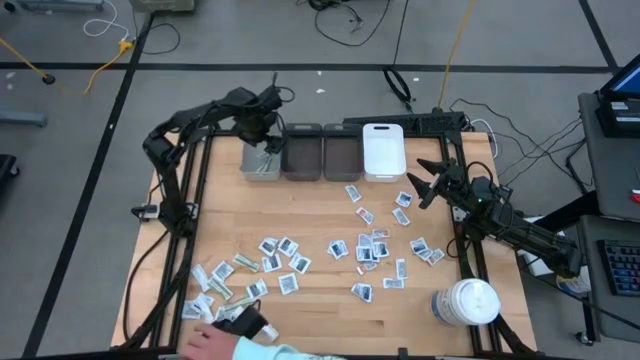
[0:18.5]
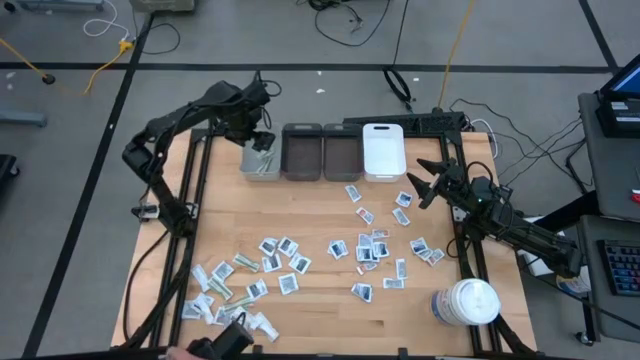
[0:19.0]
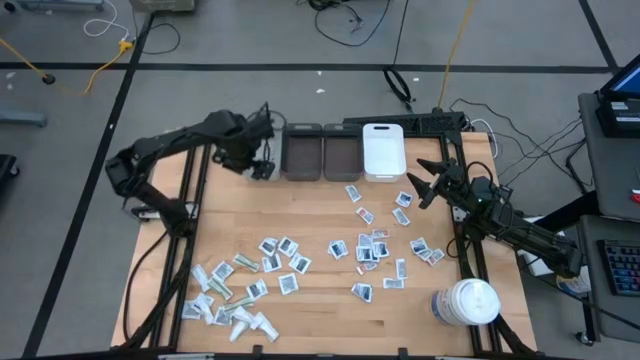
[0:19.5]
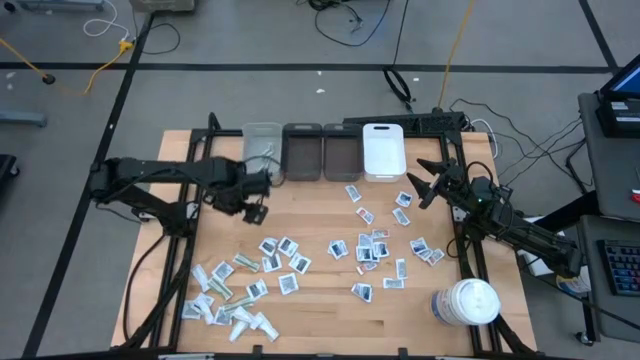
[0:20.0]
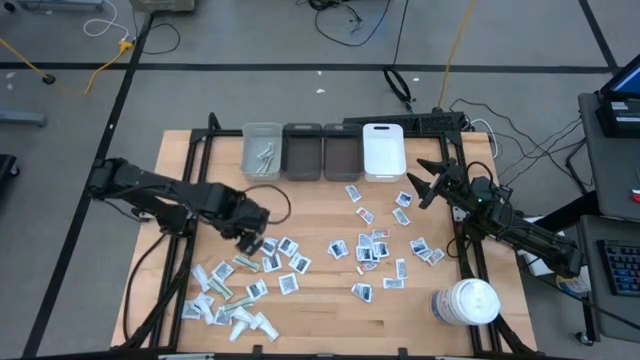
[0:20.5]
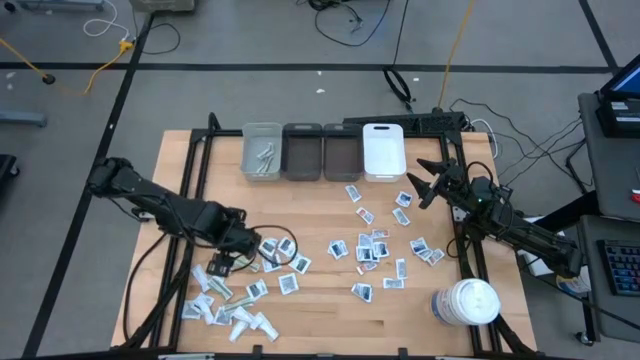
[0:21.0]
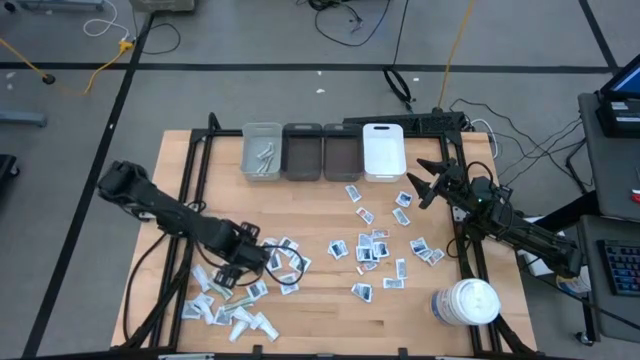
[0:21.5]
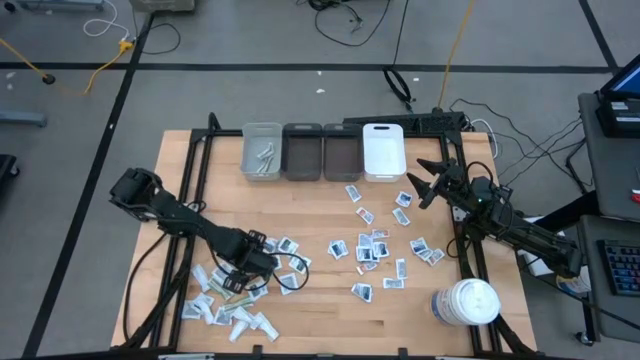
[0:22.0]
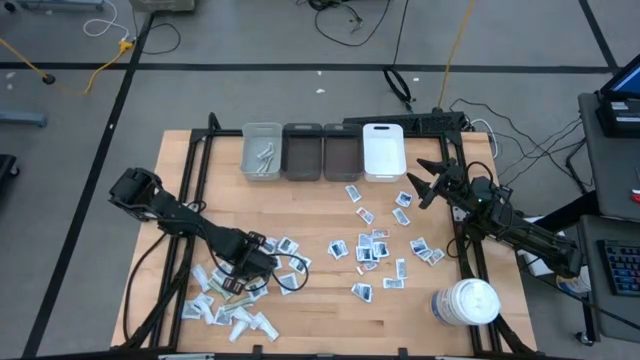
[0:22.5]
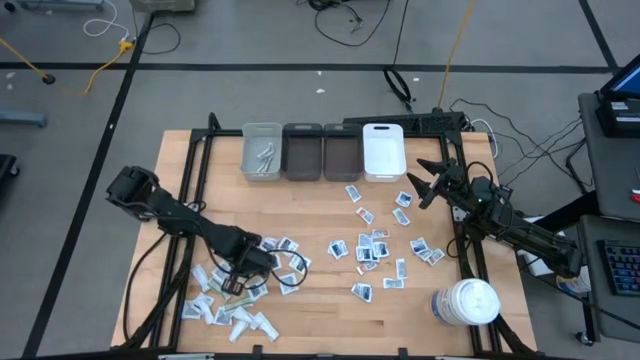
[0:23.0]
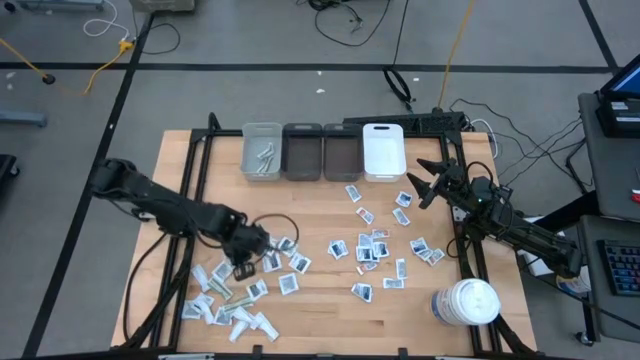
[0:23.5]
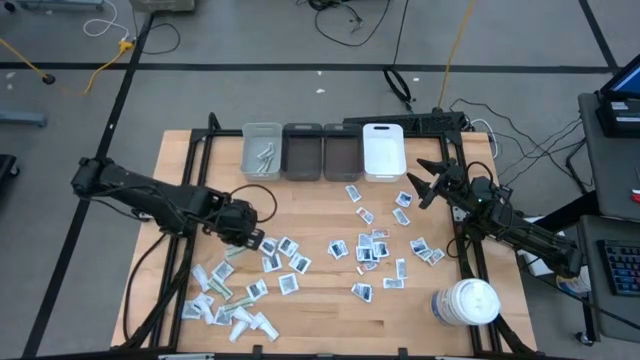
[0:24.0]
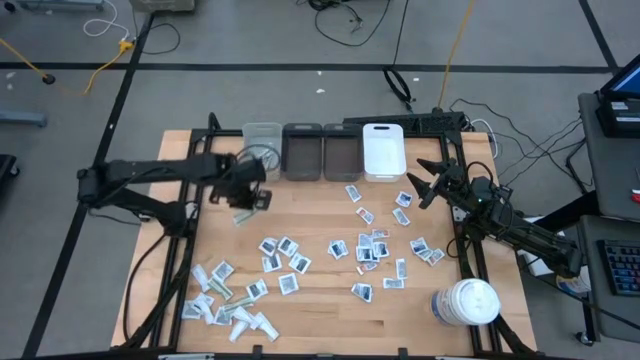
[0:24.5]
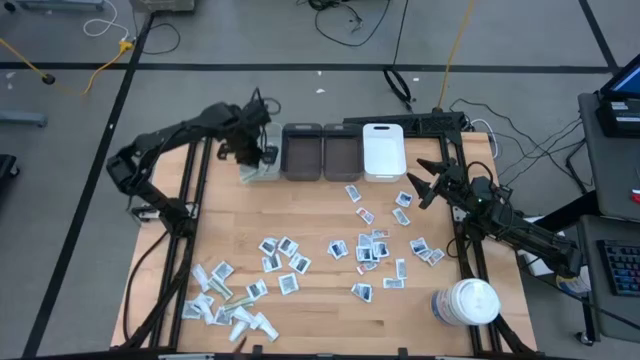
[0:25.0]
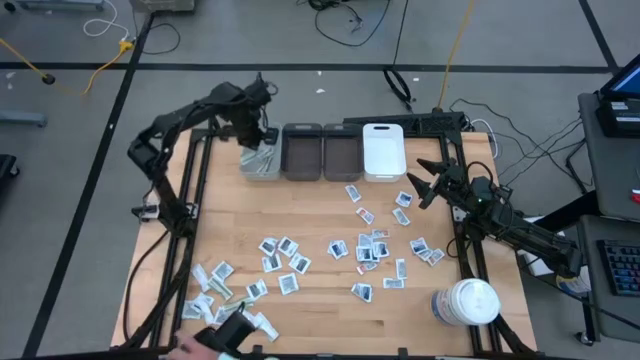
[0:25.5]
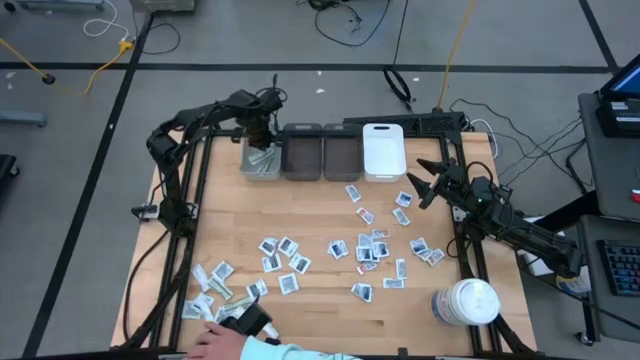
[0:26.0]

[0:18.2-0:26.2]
Task: Pick & Place First Aid Supplies
Put the bandage into the gray bin

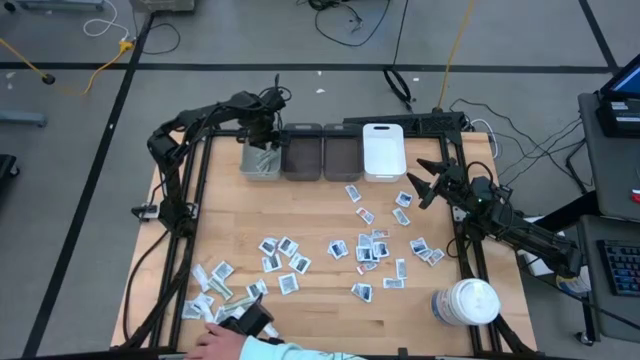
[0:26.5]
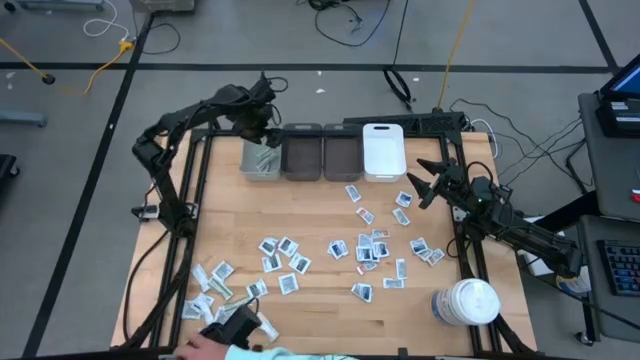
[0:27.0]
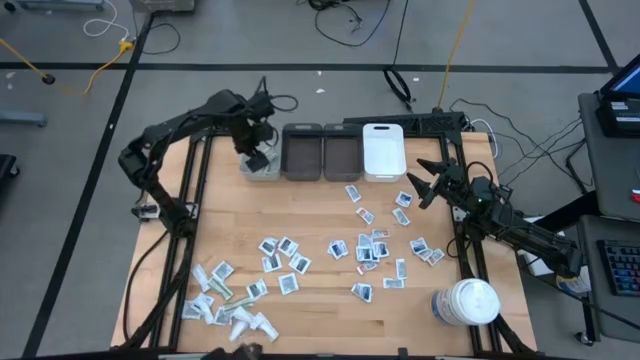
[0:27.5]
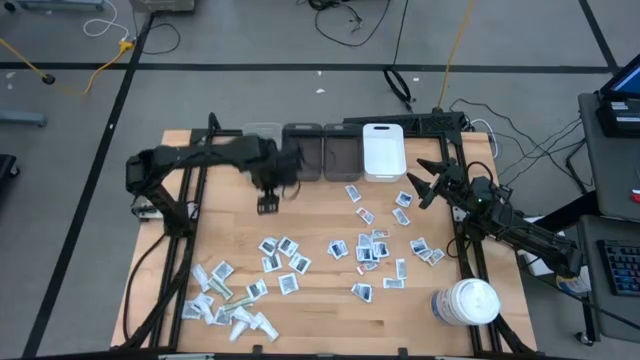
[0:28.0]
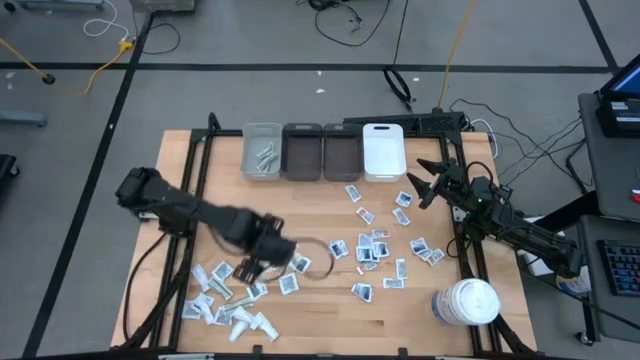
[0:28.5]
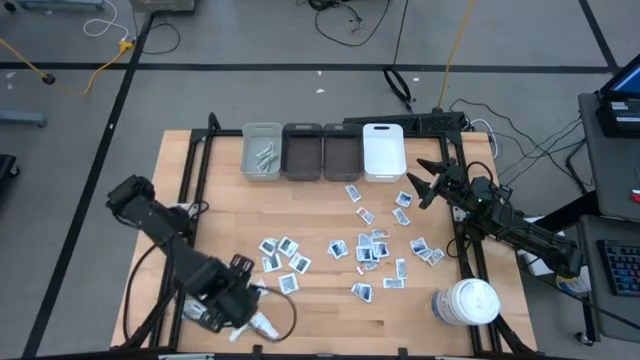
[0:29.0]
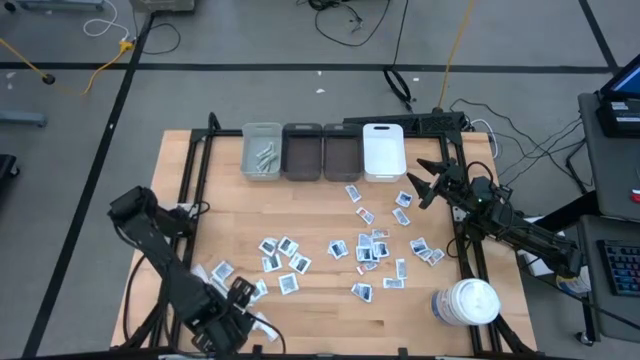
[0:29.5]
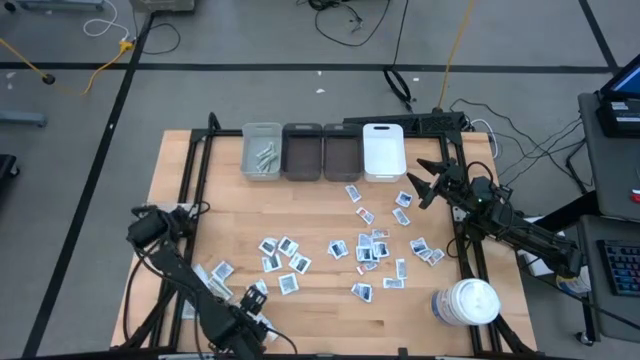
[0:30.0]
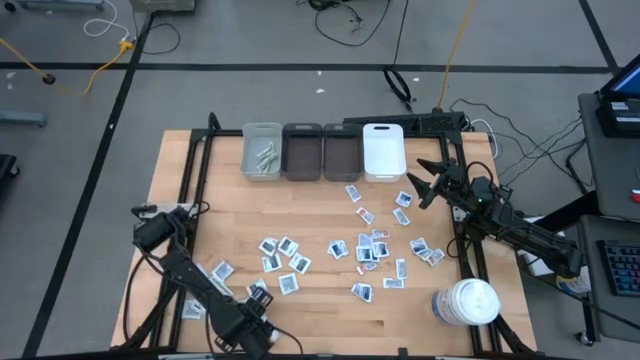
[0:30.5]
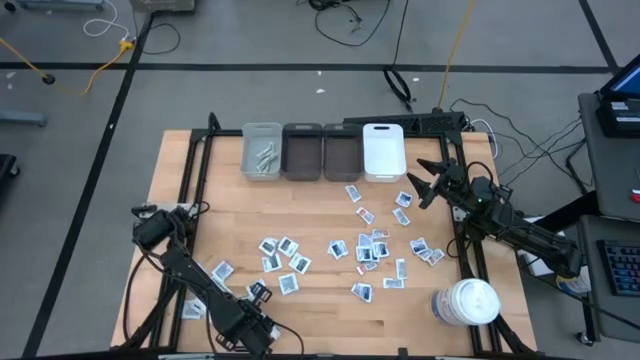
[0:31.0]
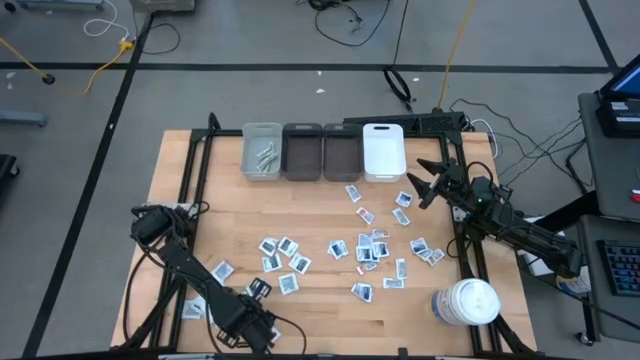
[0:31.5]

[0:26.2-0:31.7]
Put the bandage into the gray bin

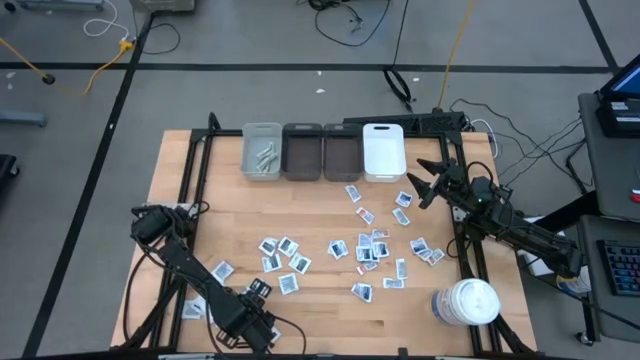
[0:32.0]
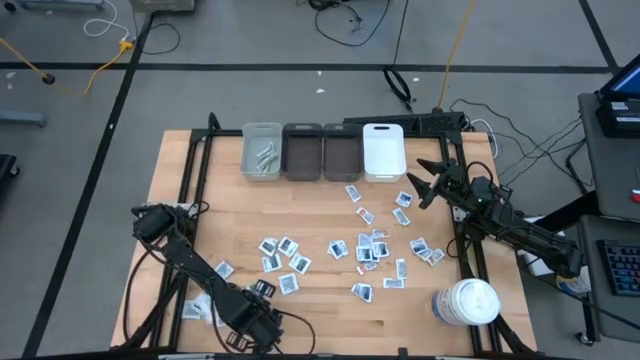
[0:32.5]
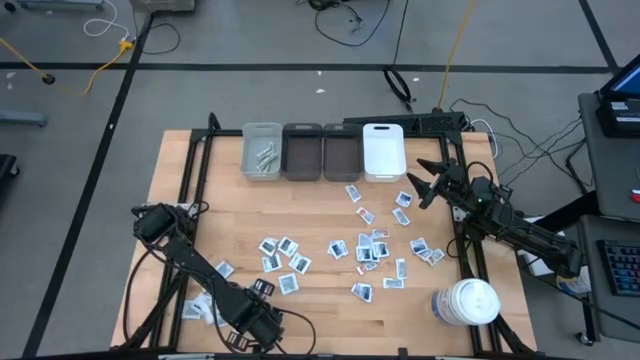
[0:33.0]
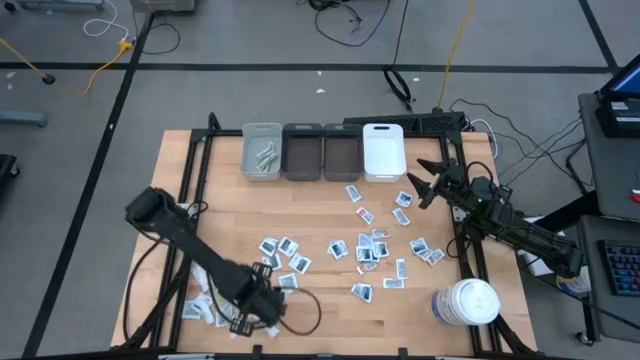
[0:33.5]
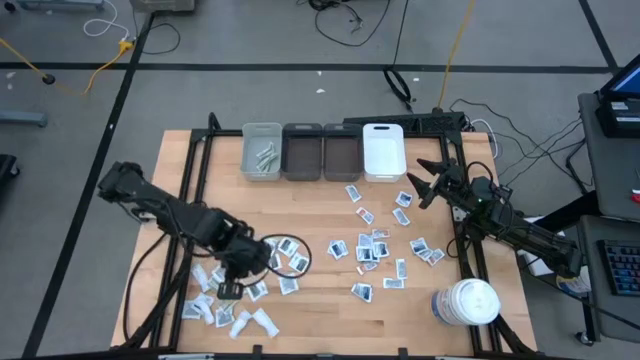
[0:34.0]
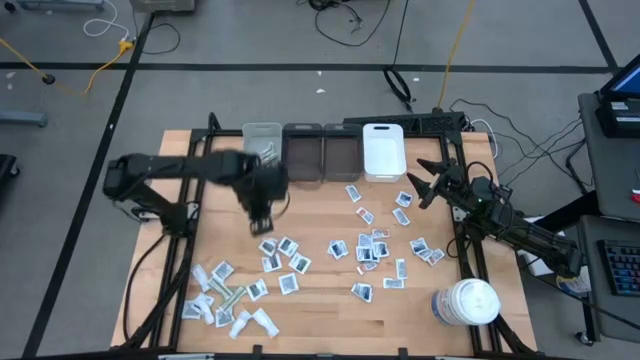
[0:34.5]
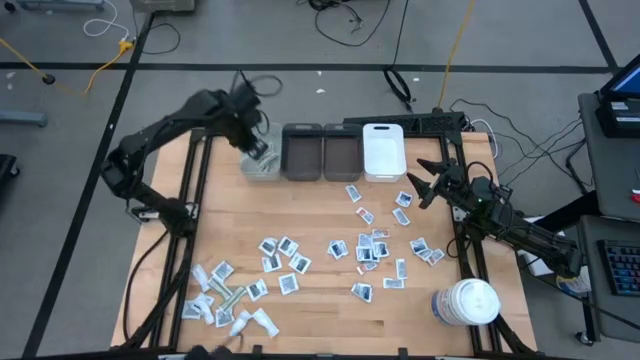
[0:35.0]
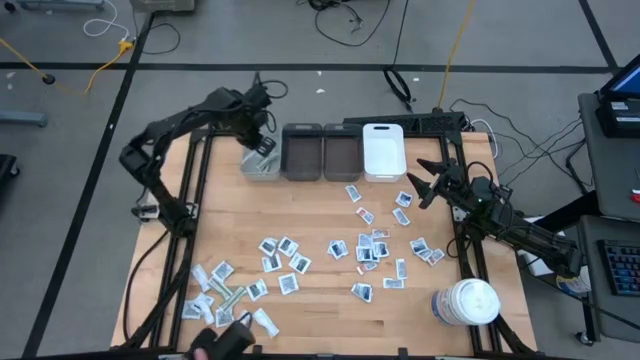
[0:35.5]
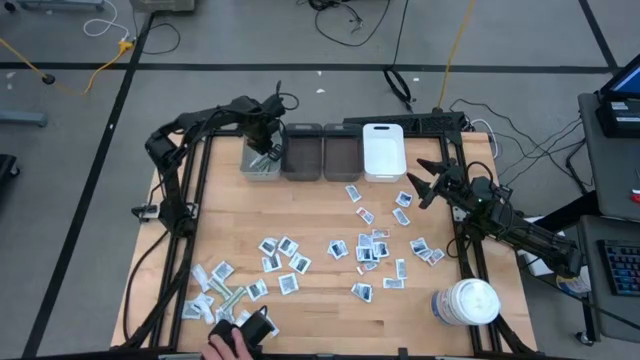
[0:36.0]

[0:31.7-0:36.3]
Put the bandage into the gray bin

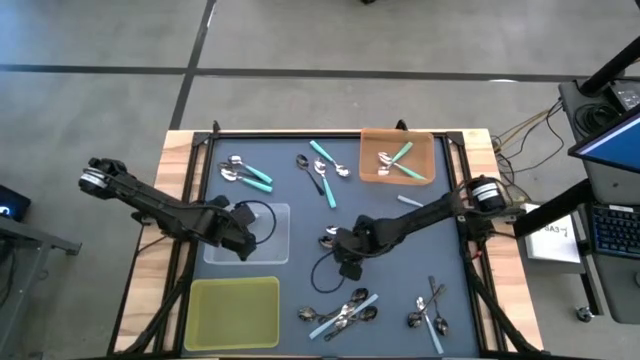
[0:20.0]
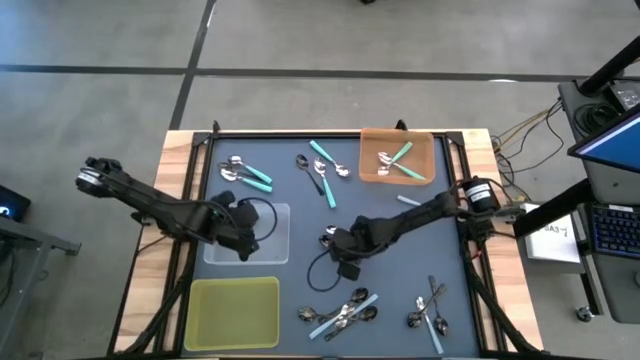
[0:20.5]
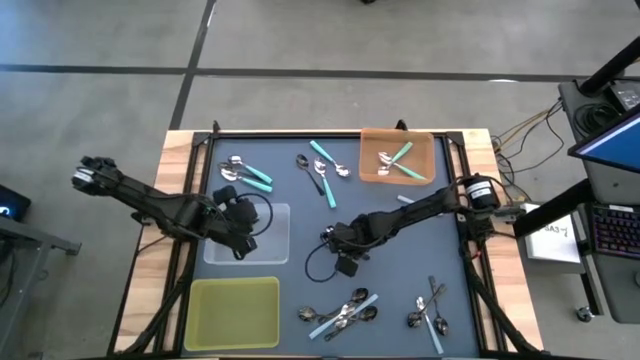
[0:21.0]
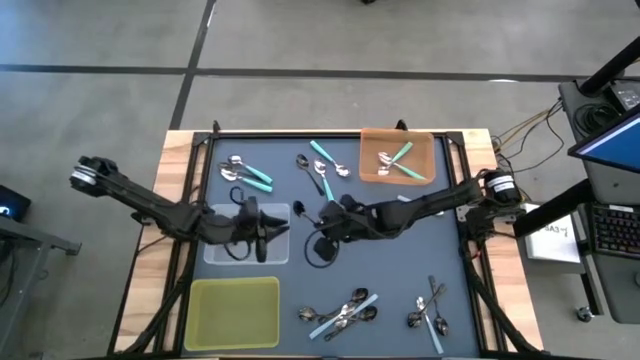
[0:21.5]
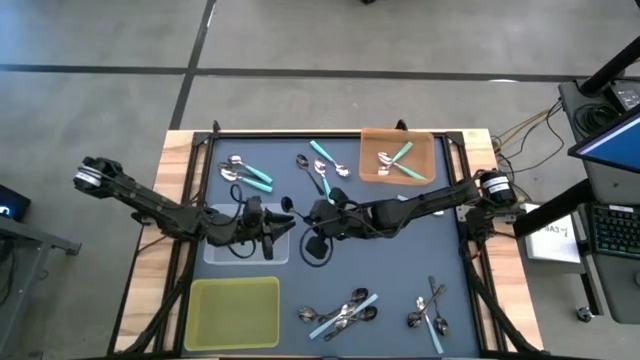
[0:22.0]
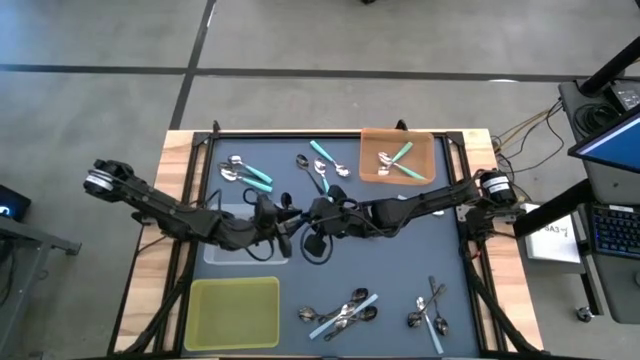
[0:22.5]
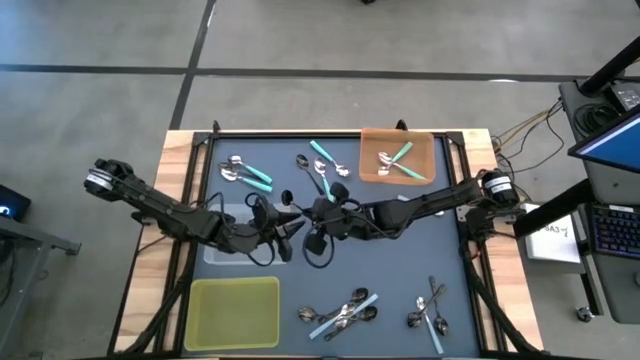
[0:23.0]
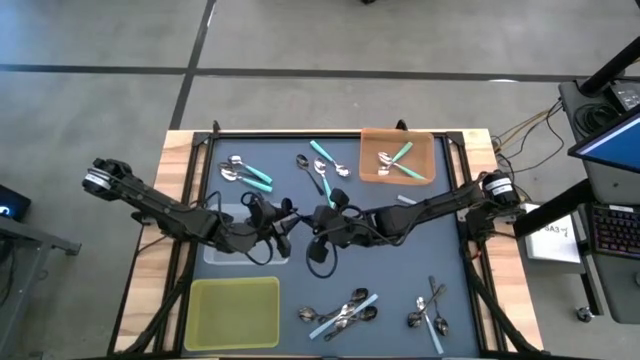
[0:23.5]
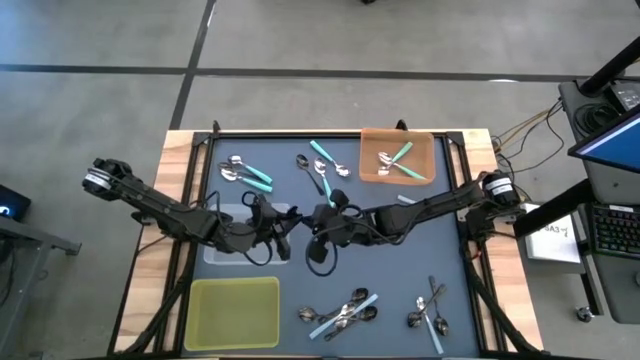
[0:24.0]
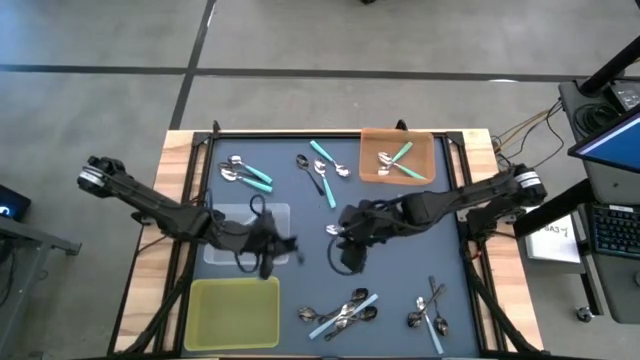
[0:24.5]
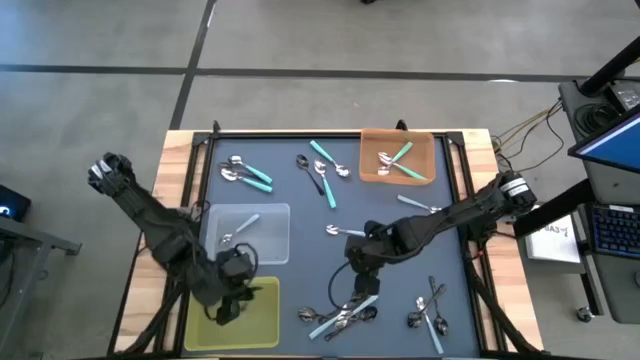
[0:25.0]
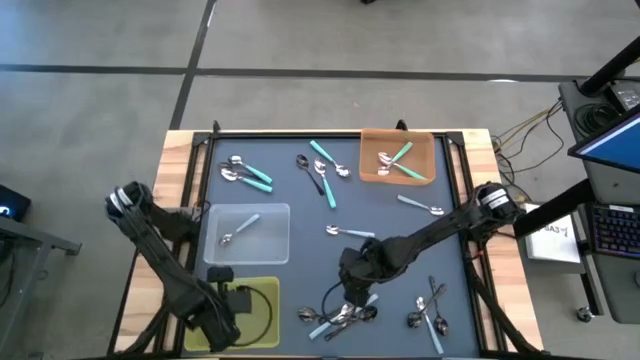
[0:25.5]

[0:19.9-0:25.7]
Task: Sort silverware by color (type)
Put the black spoon into the yellow bin
